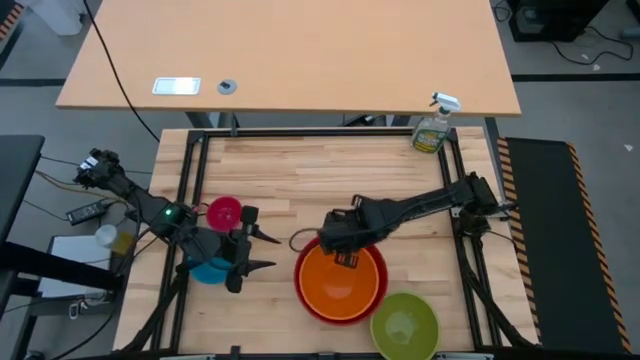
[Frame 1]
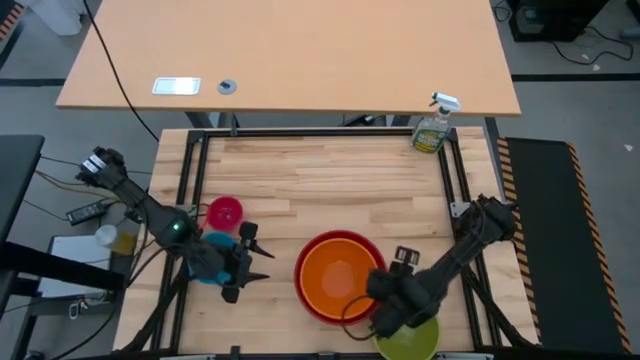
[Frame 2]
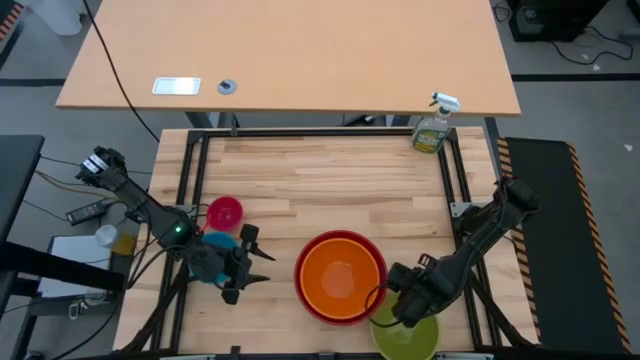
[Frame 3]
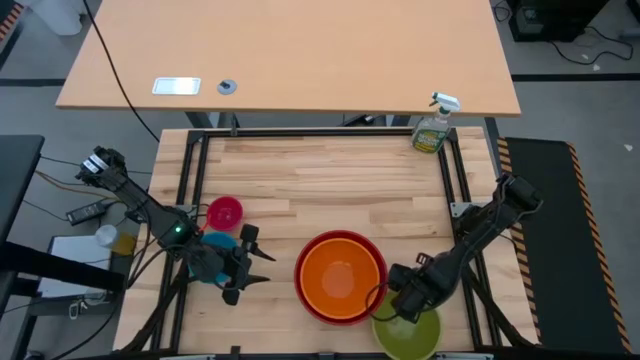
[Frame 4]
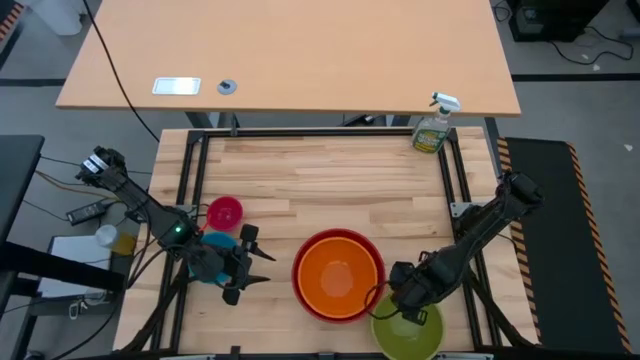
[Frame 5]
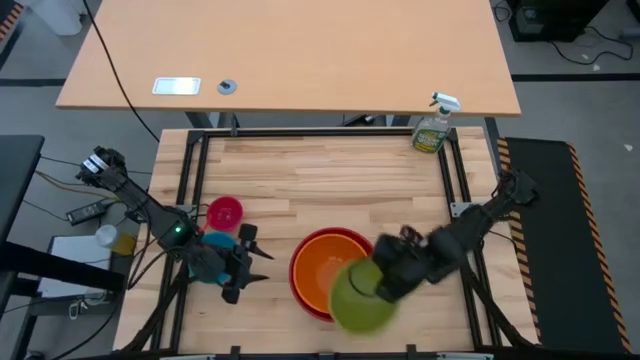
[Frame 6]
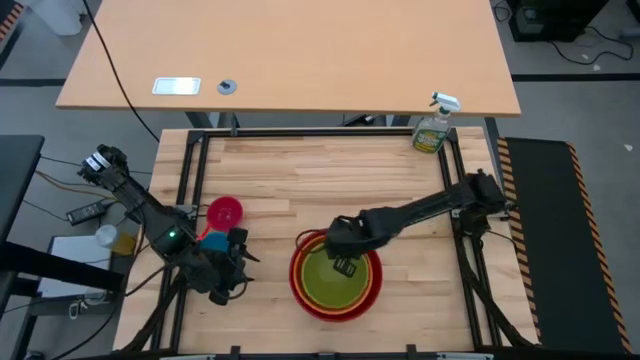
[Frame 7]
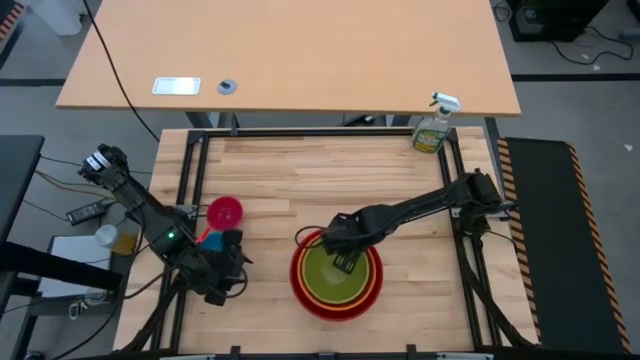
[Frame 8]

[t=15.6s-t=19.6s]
Stack the green bowl on the orange bowl

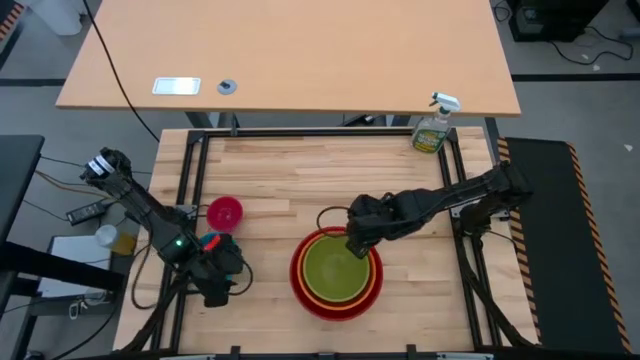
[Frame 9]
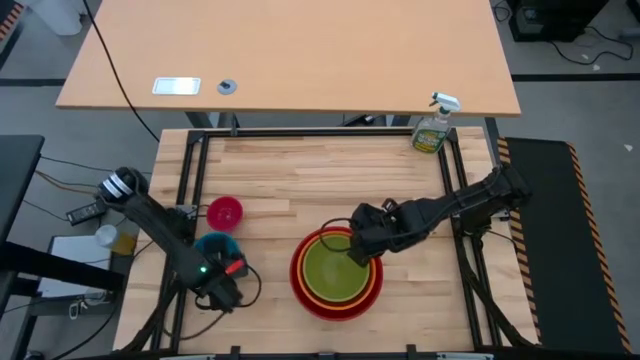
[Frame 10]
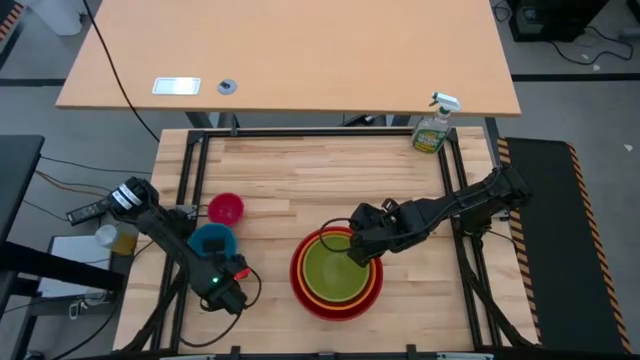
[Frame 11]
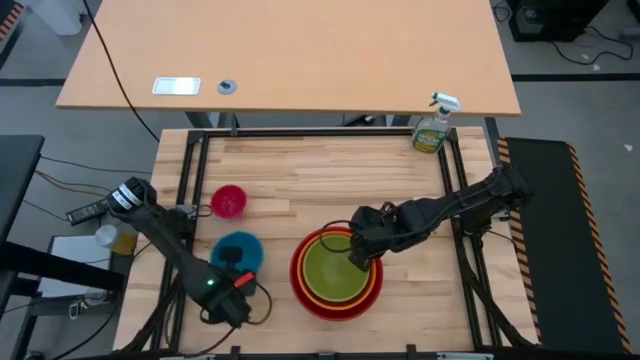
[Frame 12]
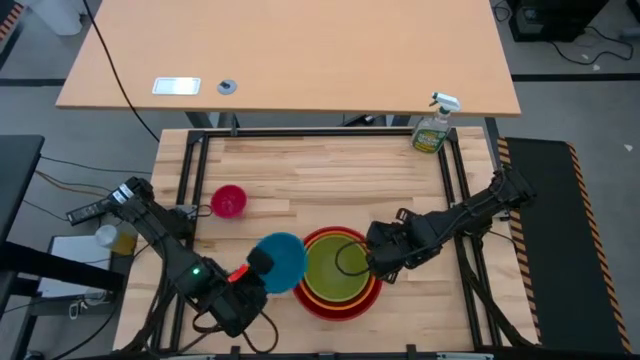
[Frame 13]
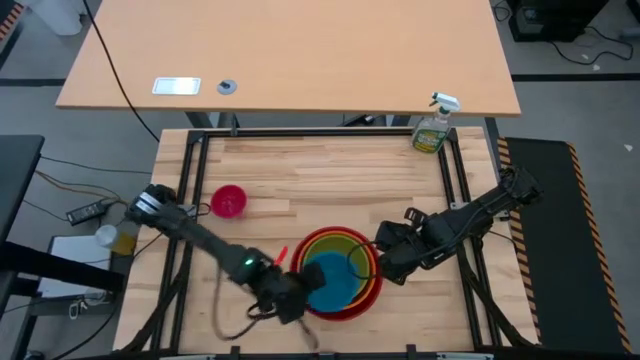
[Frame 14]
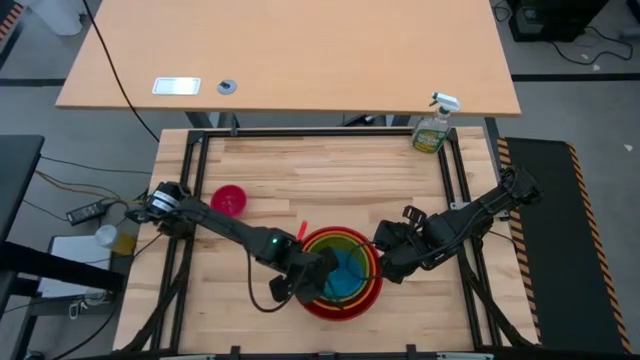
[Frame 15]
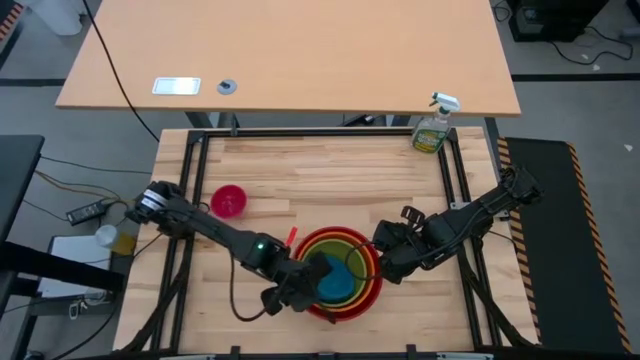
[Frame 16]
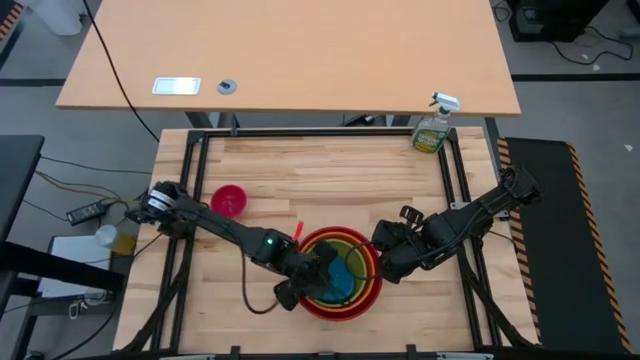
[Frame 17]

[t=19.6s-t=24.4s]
Stack the blue bowl on the green bowl

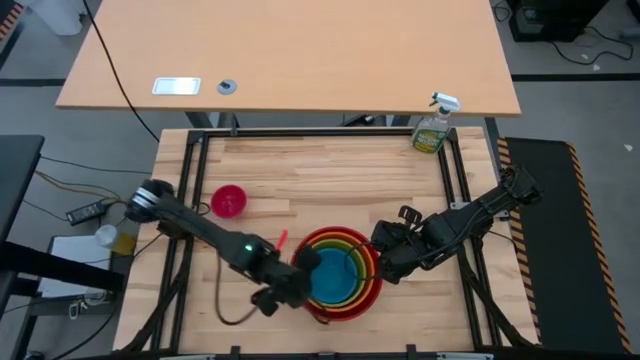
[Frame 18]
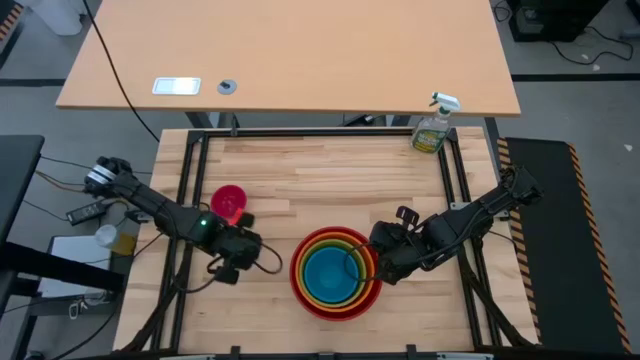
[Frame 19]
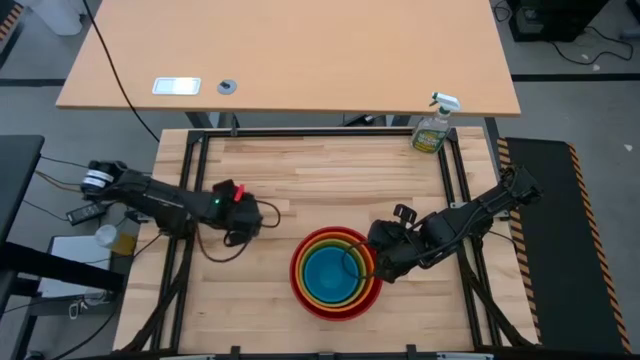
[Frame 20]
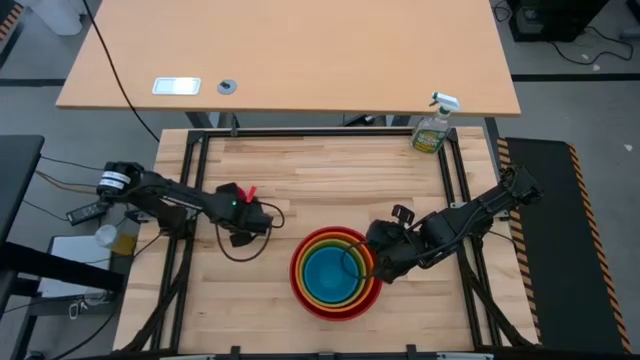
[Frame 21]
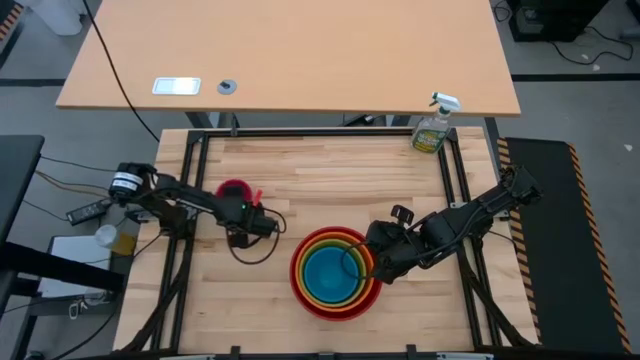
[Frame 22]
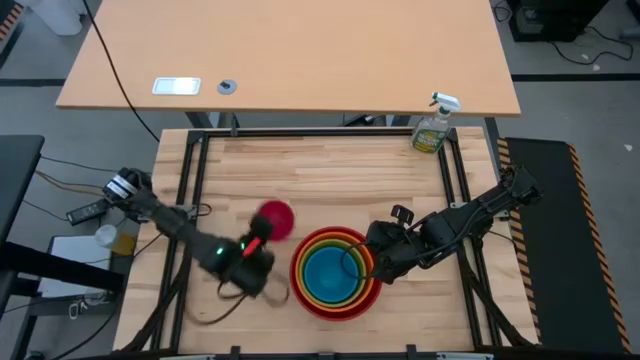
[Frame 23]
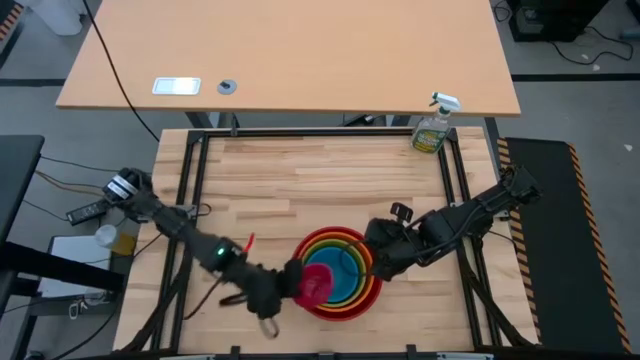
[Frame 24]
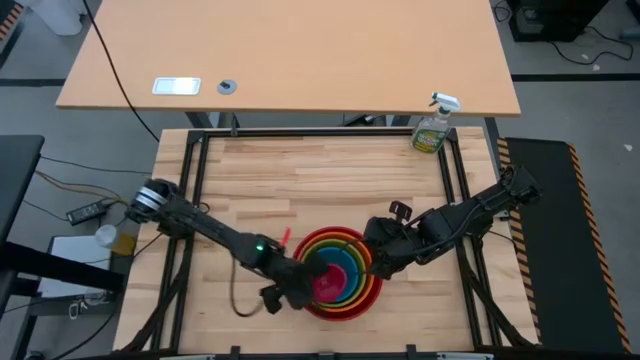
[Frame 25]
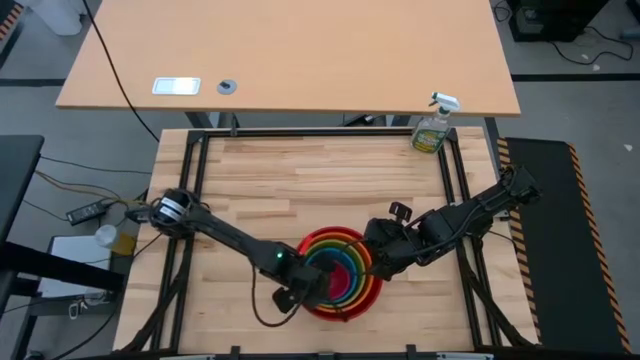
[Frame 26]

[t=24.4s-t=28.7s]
Stack the pink bowl on the blue bowl

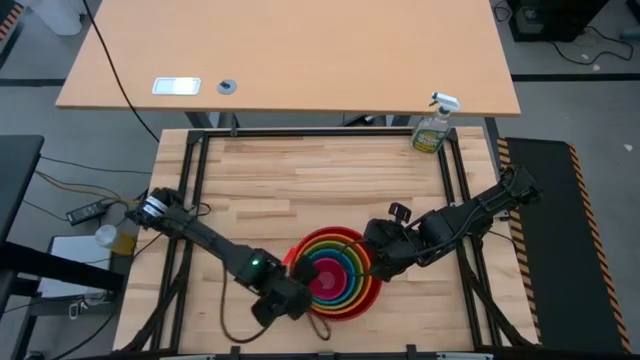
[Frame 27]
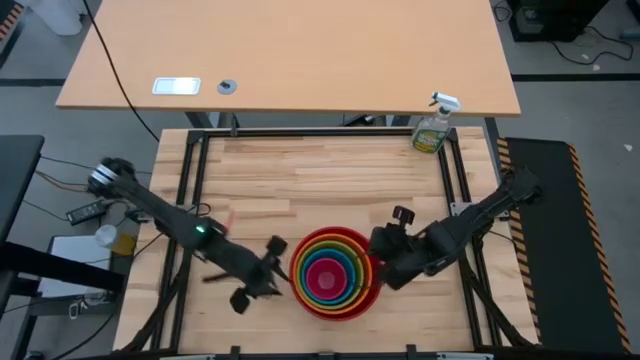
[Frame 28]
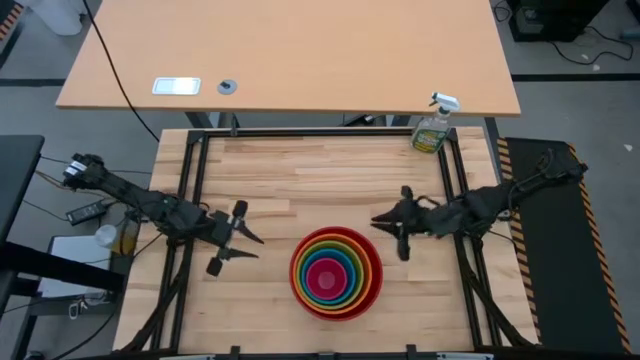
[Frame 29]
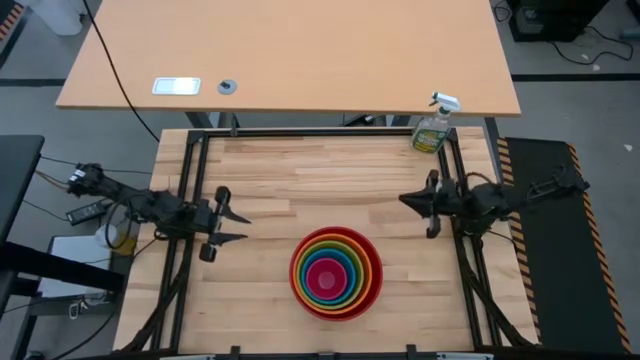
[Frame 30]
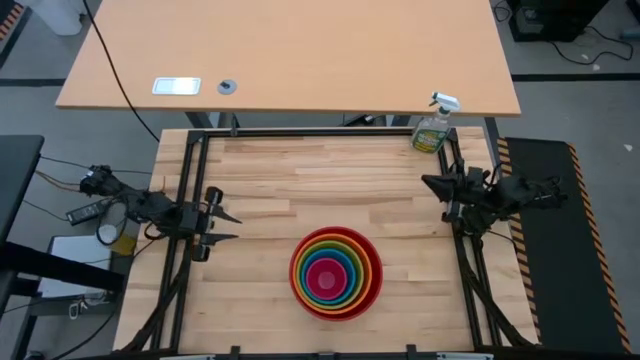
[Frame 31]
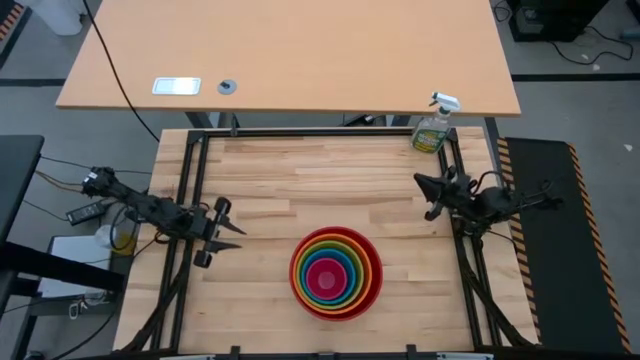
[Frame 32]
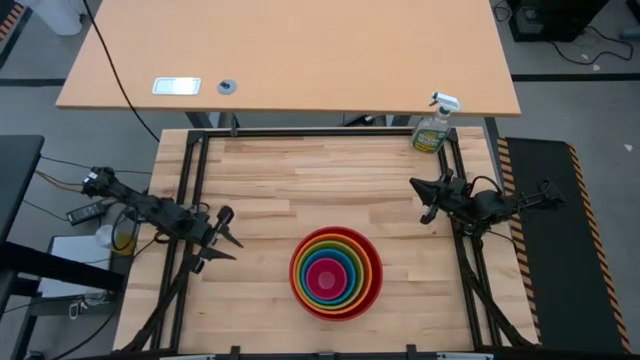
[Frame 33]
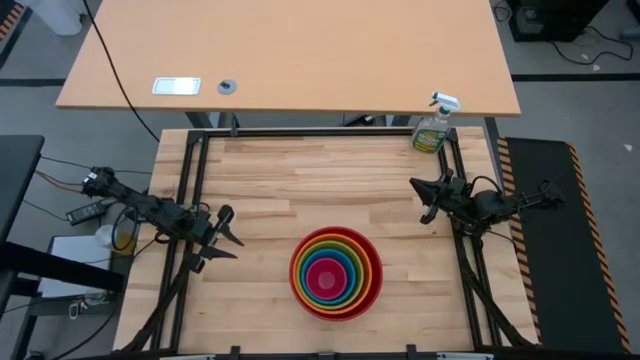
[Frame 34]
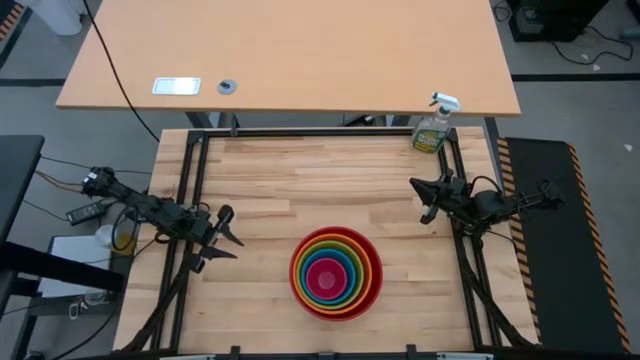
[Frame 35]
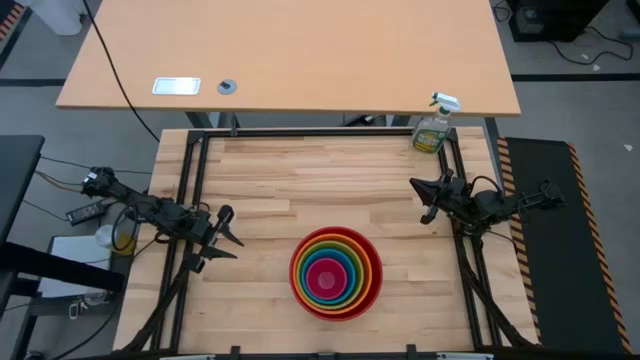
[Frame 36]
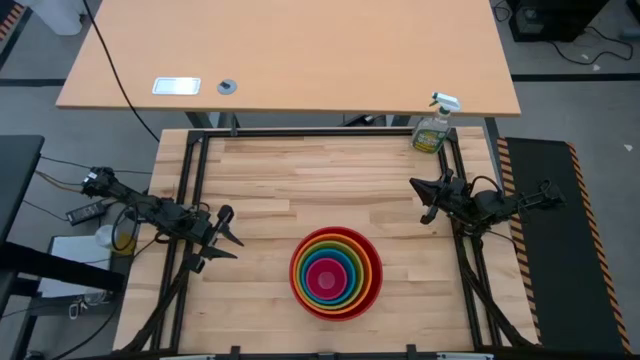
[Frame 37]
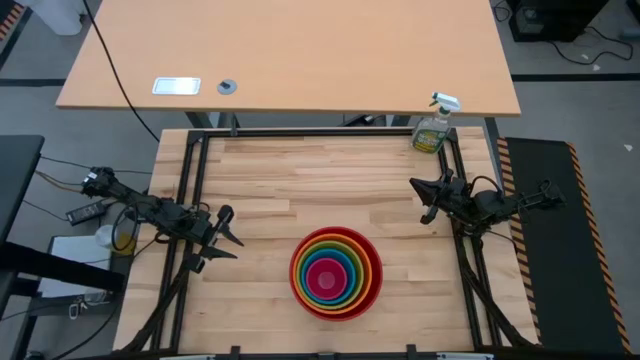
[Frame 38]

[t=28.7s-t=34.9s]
Return to Home Position
